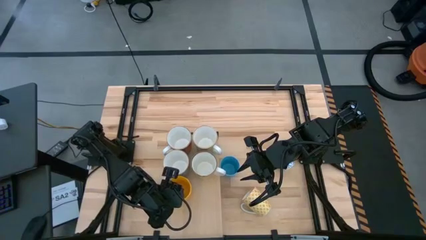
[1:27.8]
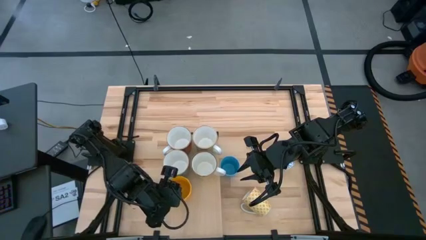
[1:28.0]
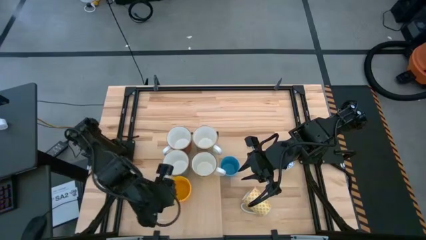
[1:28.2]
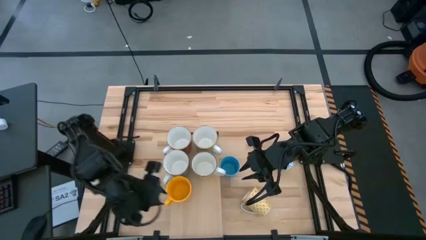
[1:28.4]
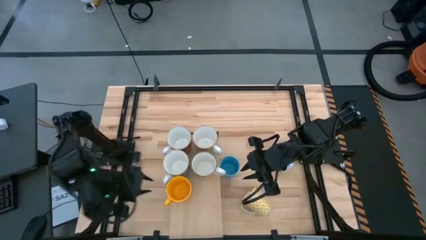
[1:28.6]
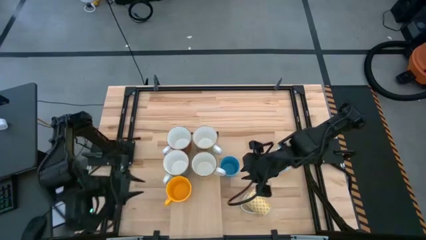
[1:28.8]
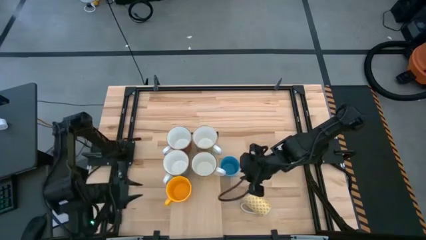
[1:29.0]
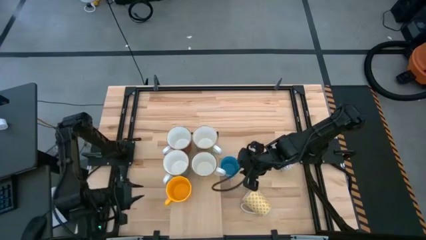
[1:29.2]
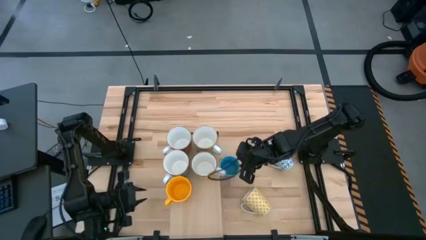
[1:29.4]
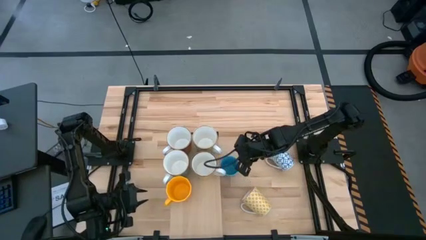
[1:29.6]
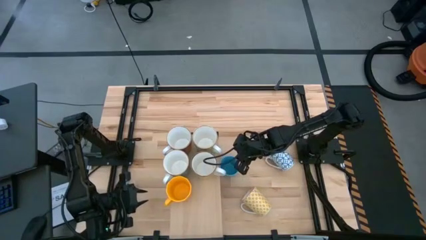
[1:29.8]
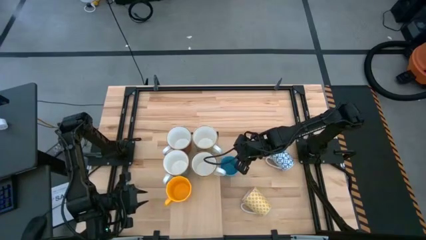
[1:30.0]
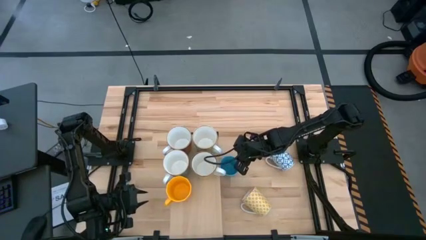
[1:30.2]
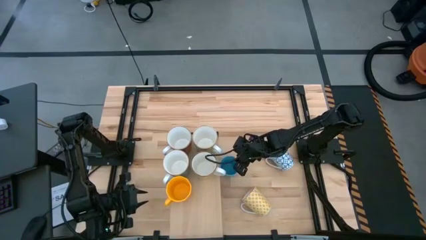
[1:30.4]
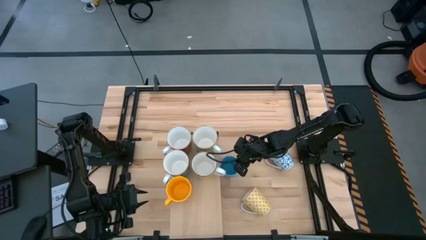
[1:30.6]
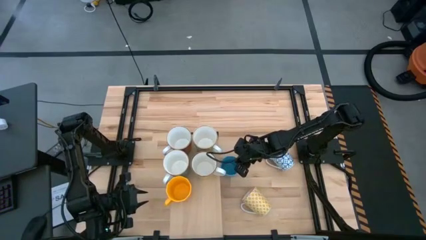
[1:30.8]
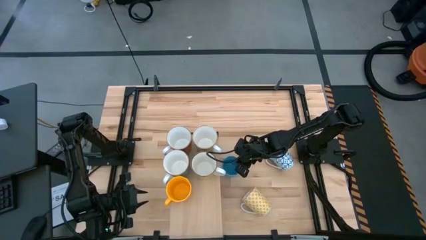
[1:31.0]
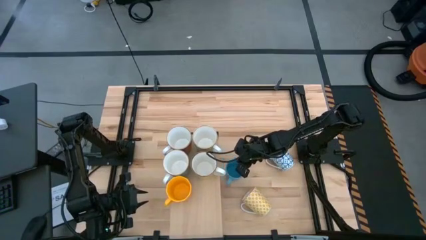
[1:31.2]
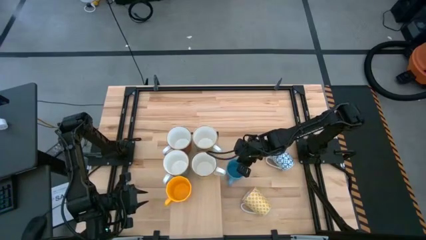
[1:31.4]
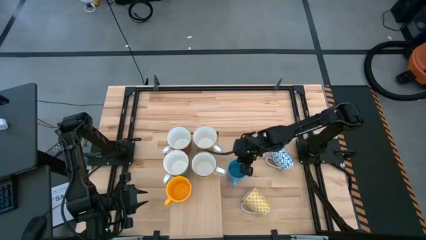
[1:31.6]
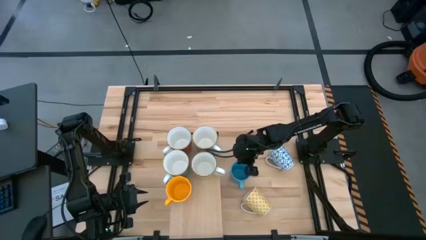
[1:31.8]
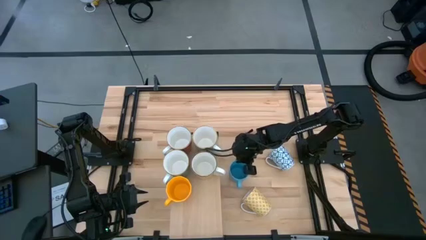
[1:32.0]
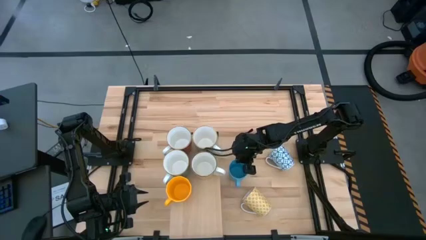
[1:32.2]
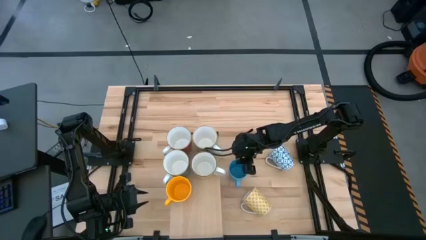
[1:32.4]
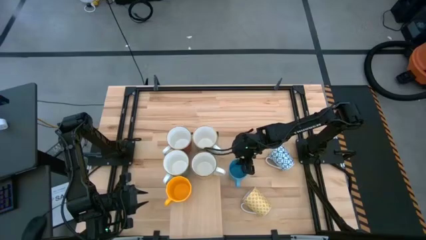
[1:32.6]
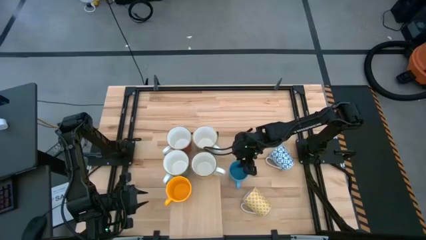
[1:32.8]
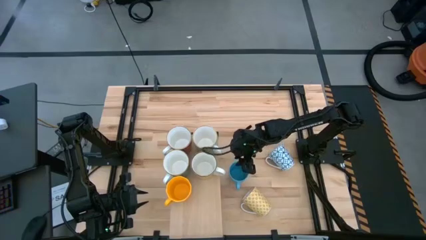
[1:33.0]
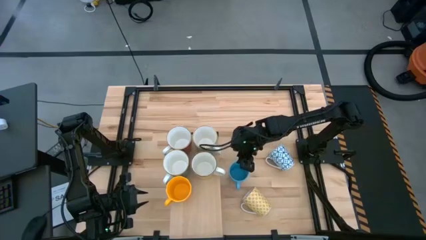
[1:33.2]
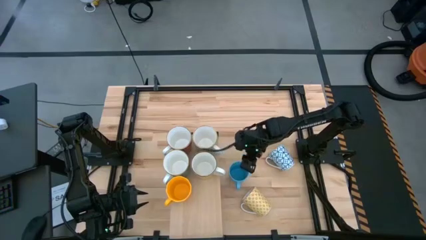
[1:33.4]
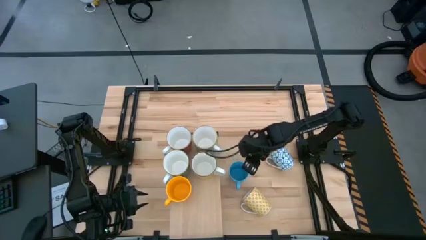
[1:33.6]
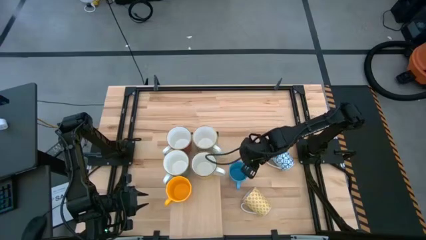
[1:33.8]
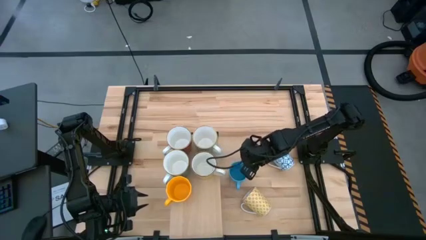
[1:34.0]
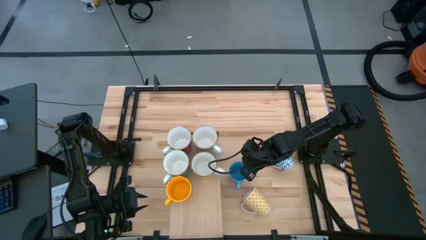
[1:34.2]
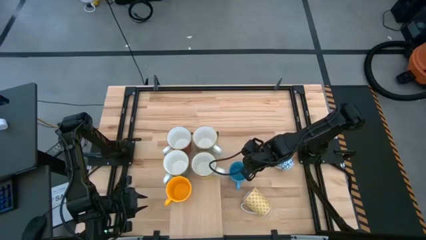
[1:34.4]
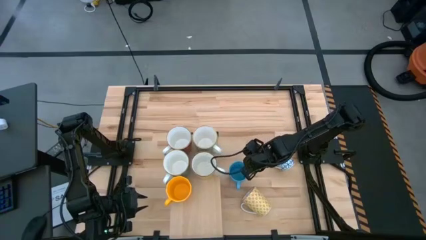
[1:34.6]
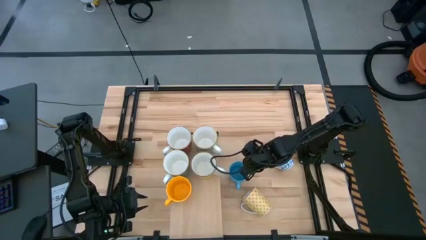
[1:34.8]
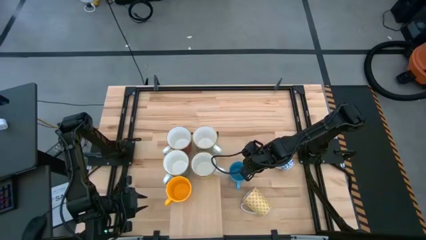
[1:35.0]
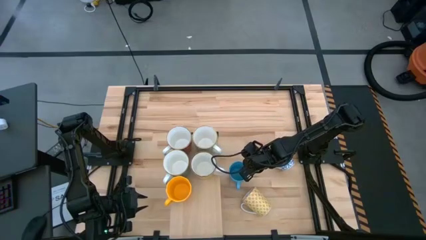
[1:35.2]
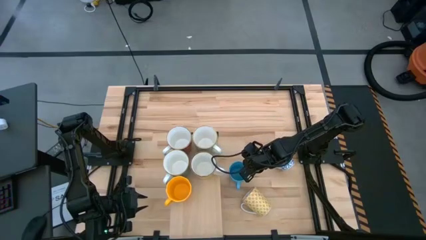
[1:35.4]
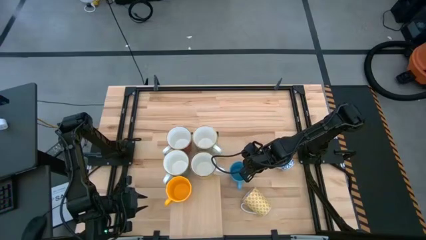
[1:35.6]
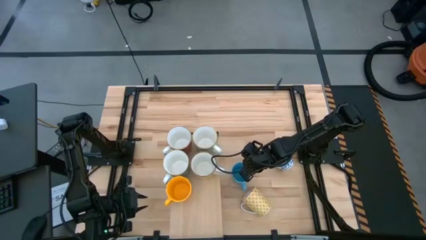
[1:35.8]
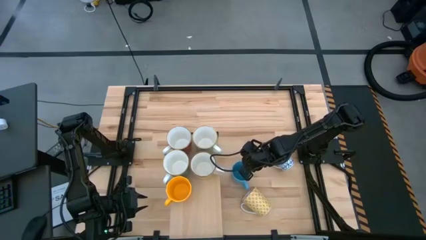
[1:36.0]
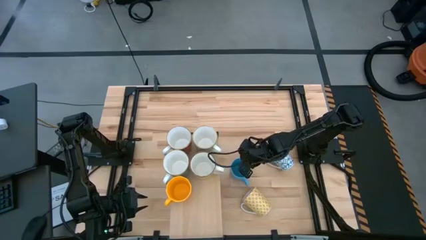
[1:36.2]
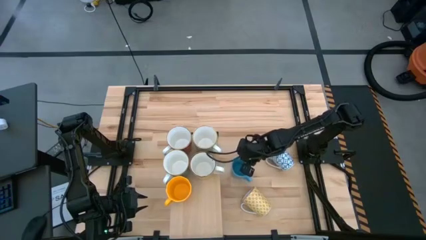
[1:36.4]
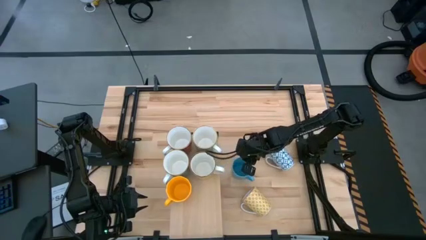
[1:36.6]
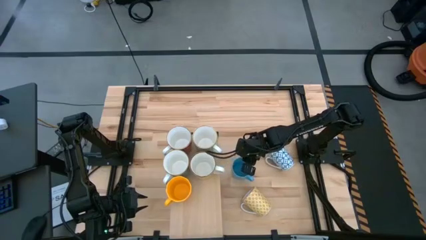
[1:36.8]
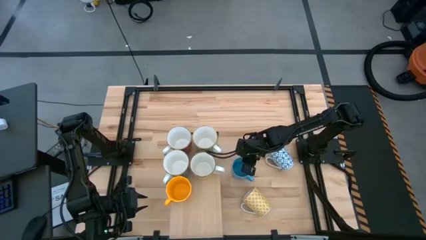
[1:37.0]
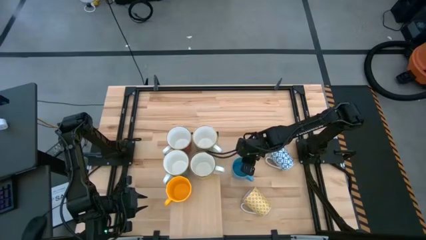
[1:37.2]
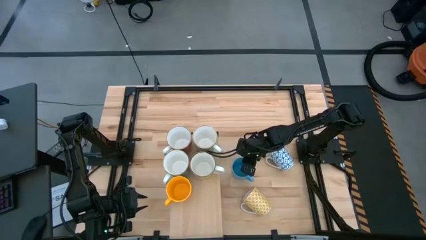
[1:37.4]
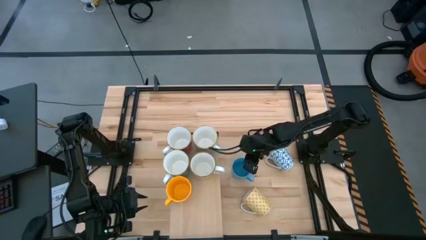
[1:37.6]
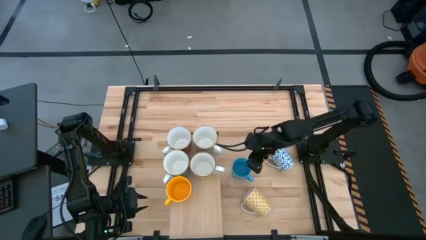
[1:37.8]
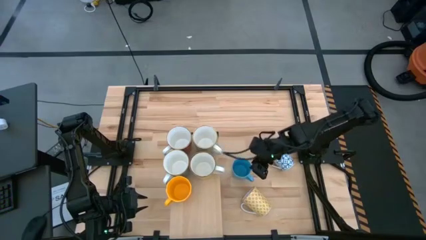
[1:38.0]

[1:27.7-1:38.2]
Task: Place coffee mugs
Put the left blue mug on the shelf aligned with the yellow mug

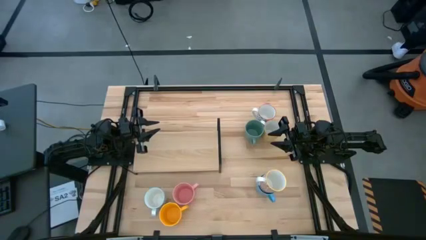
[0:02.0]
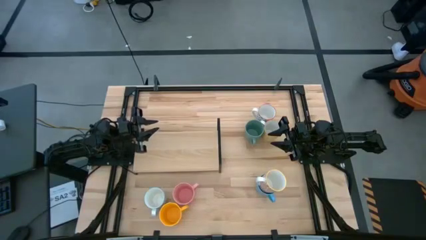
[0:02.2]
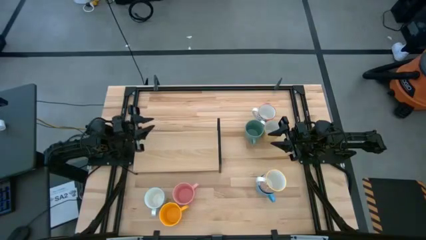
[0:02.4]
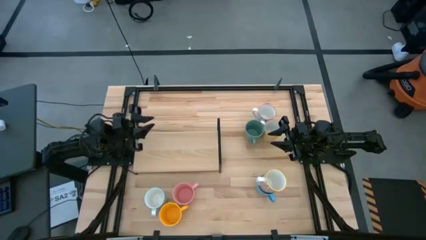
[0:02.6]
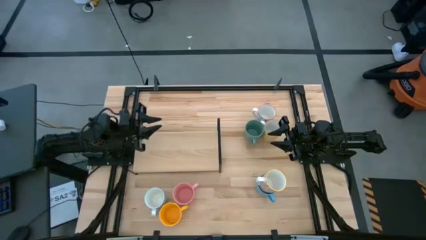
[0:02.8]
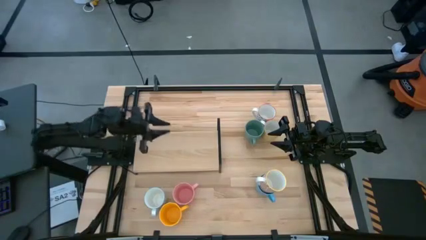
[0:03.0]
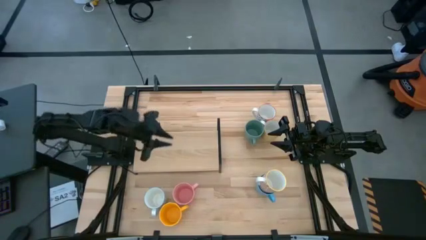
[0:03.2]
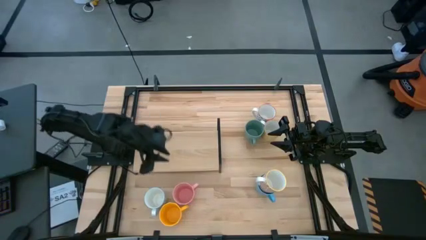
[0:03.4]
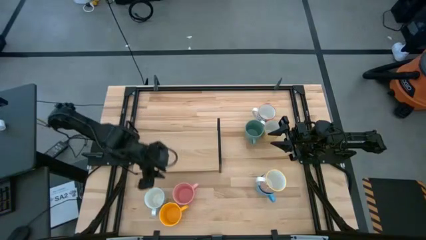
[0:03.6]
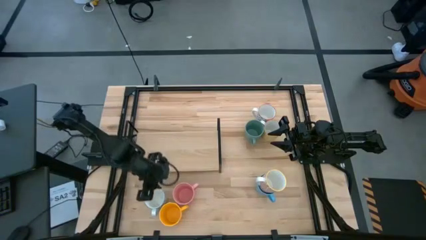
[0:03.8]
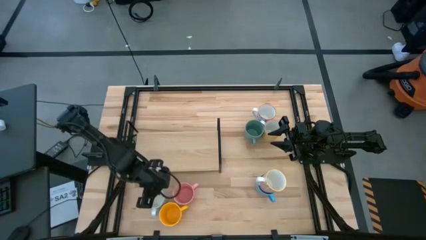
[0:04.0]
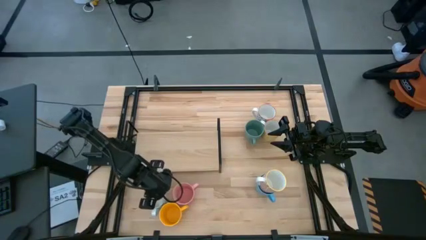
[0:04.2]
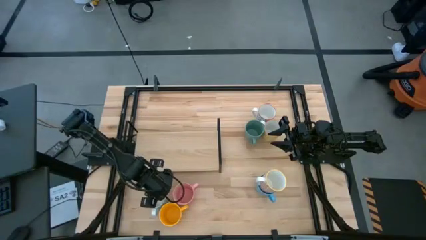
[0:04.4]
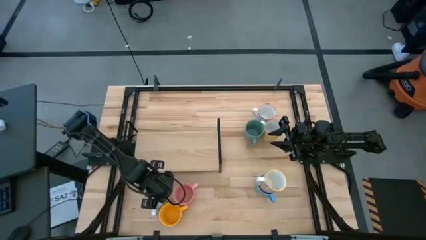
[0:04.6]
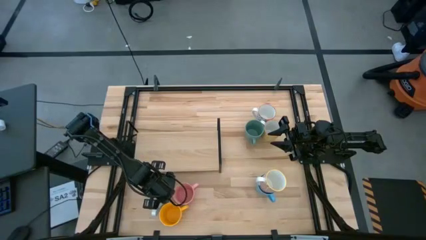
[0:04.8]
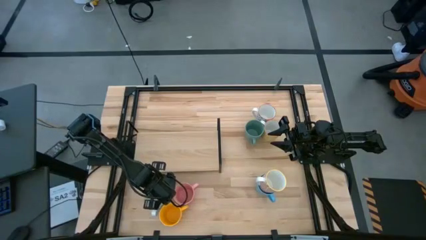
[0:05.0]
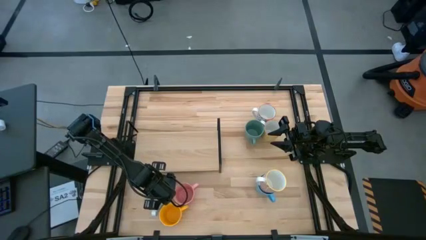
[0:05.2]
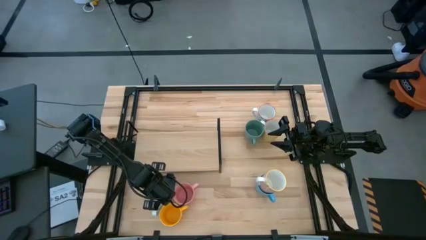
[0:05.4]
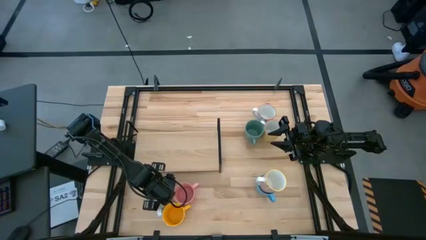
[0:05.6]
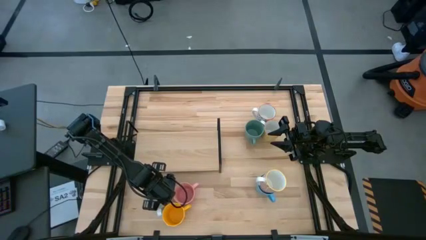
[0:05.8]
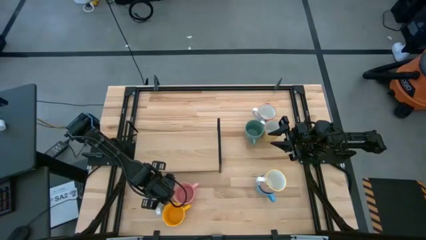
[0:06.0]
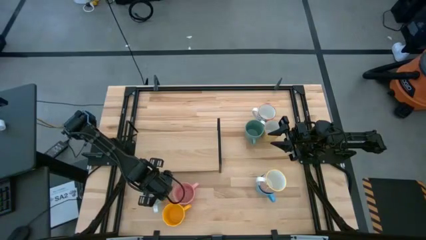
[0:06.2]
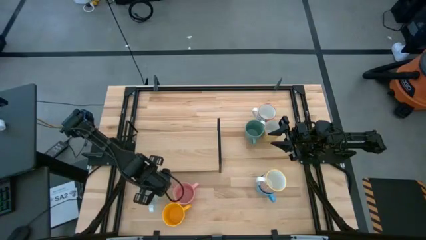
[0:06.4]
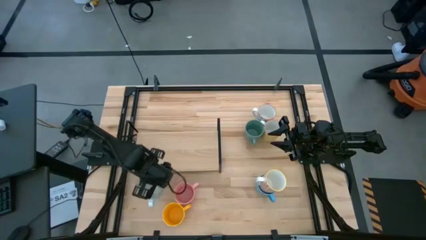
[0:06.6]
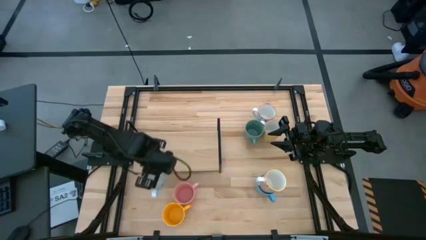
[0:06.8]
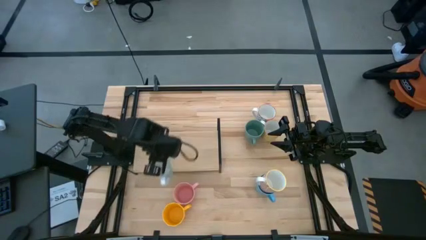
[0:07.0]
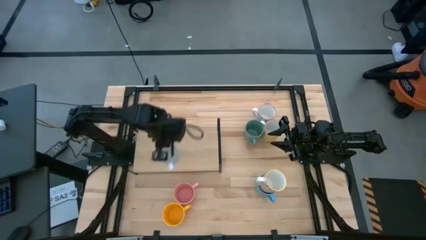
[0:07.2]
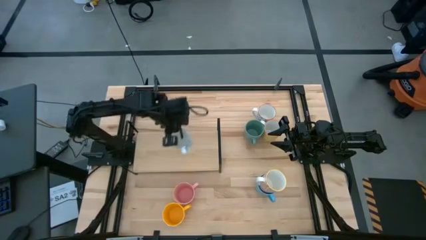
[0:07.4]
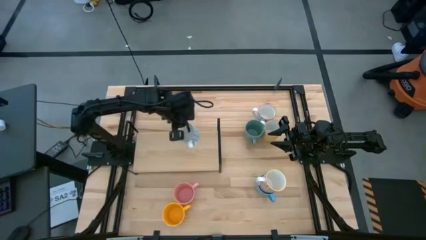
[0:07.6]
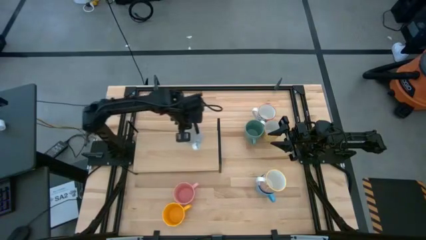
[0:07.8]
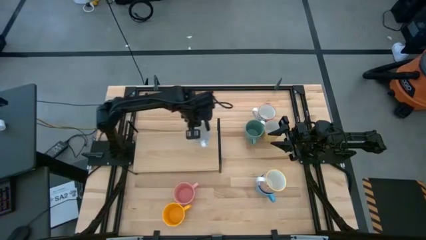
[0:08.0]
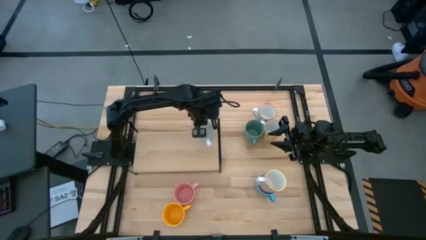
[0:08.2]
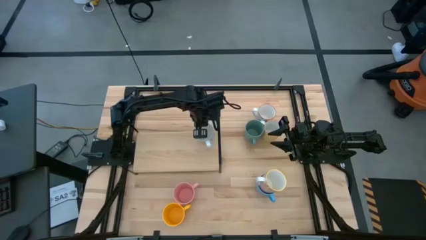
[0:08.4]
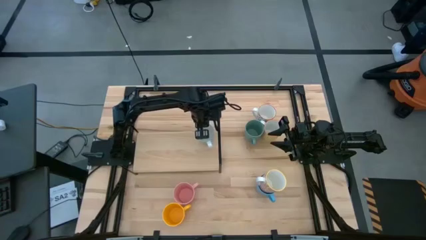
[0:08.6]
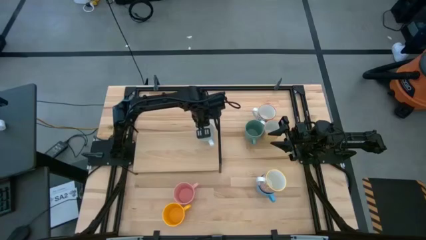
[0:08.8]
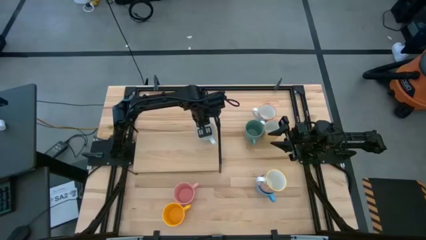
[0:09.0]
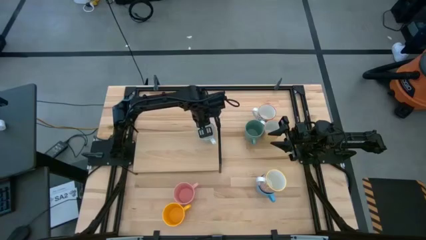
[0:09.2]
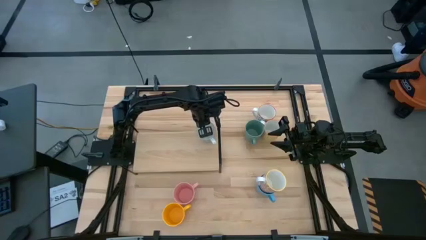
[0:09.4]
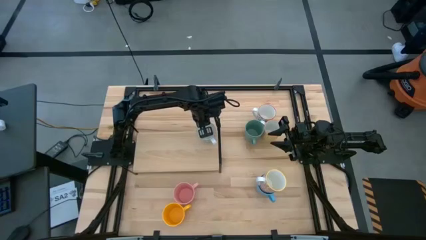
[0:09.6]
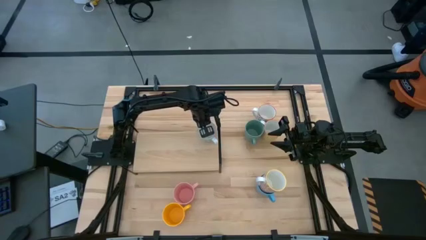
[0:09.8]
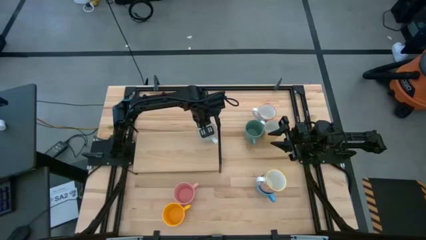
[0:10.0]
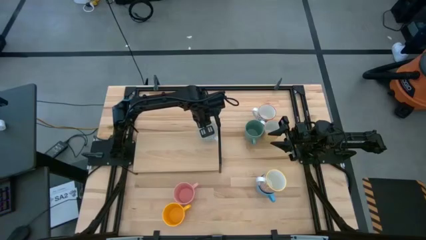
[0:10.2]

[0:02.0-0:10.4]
Task: Place coffee mugs
Put the blue patterned mug on the shelf
